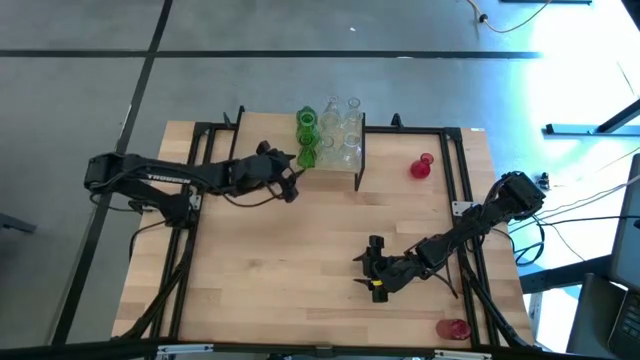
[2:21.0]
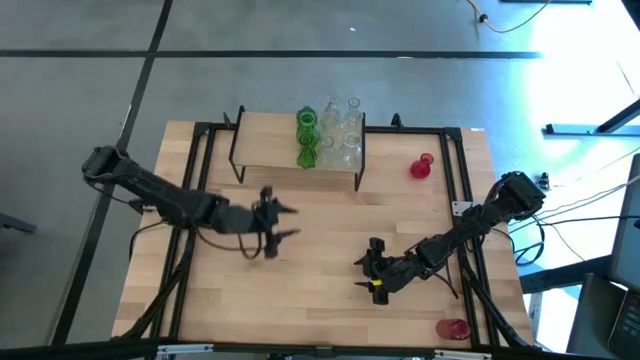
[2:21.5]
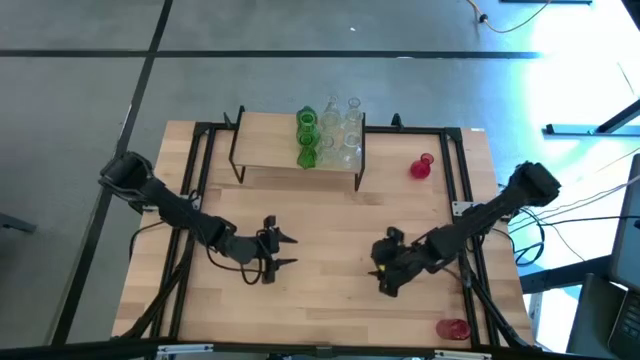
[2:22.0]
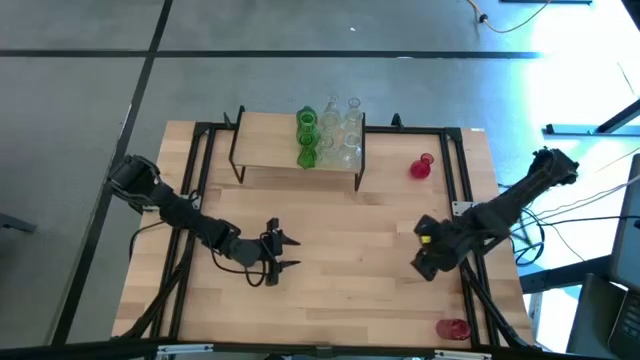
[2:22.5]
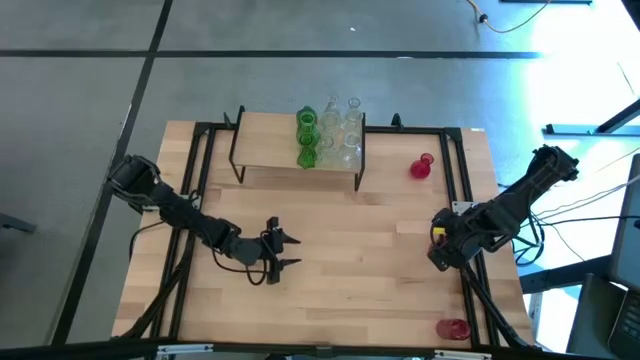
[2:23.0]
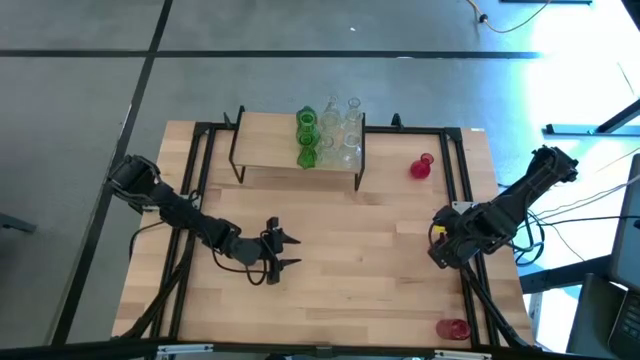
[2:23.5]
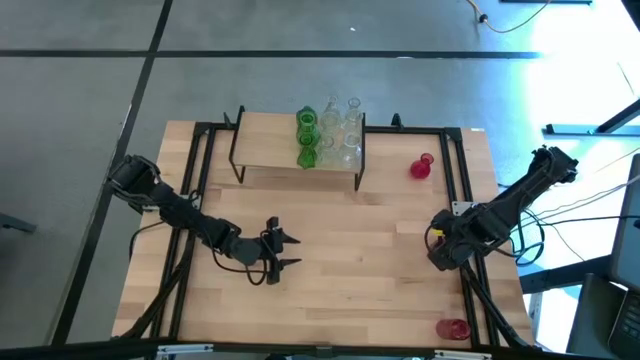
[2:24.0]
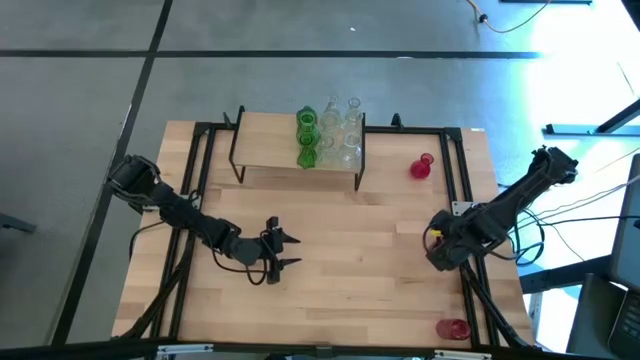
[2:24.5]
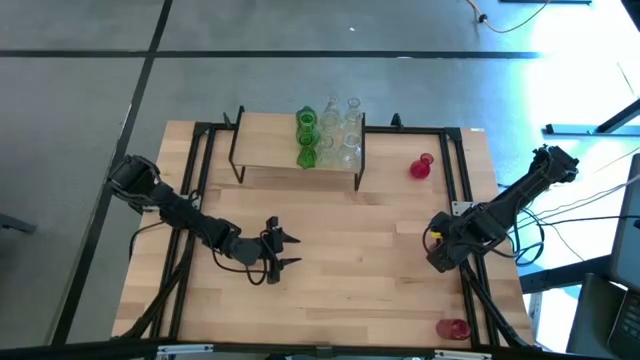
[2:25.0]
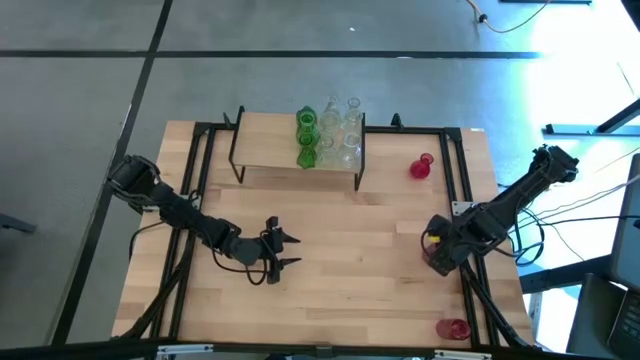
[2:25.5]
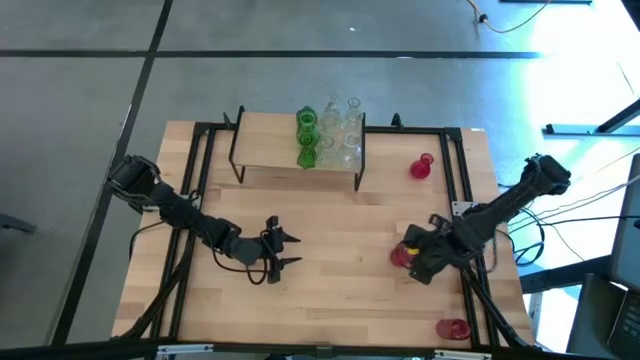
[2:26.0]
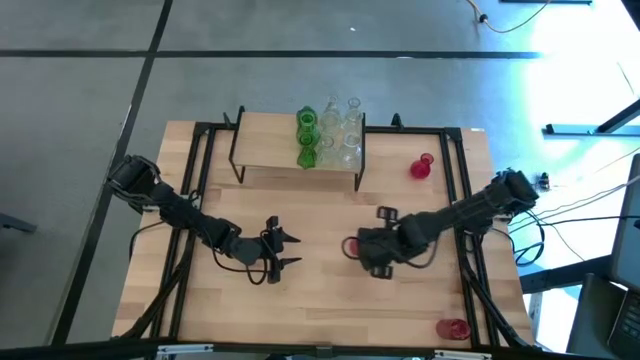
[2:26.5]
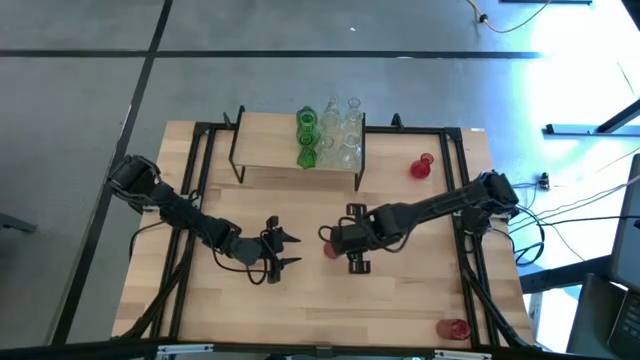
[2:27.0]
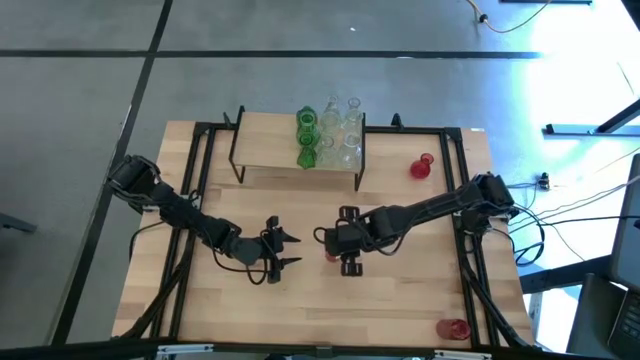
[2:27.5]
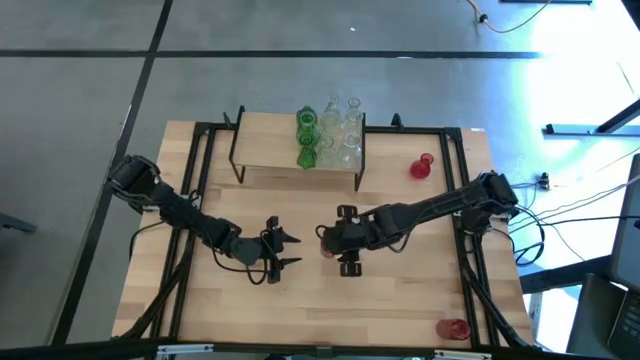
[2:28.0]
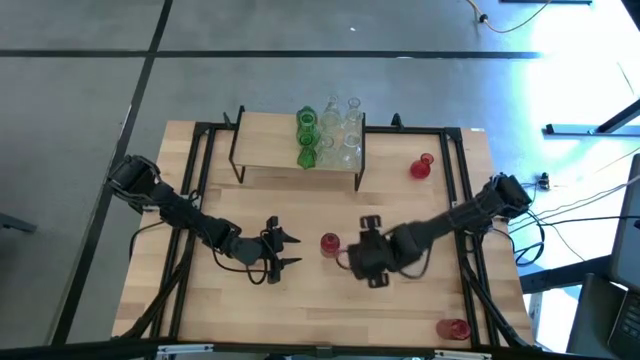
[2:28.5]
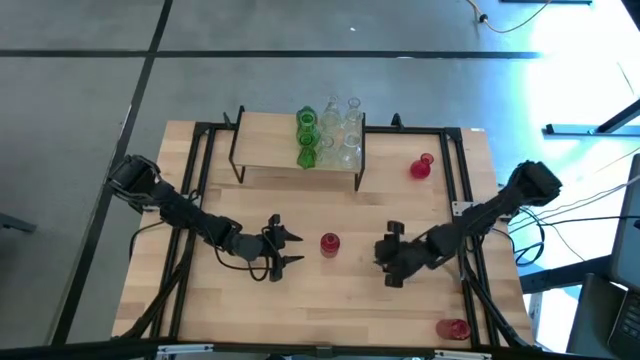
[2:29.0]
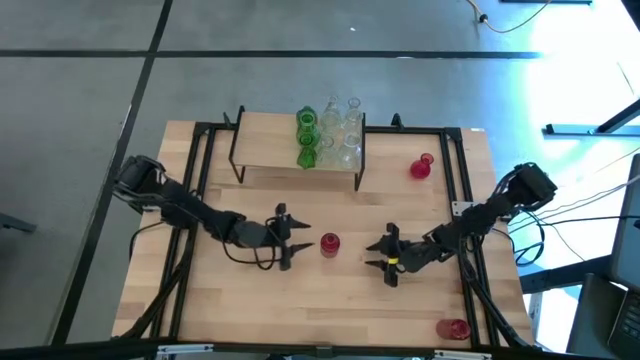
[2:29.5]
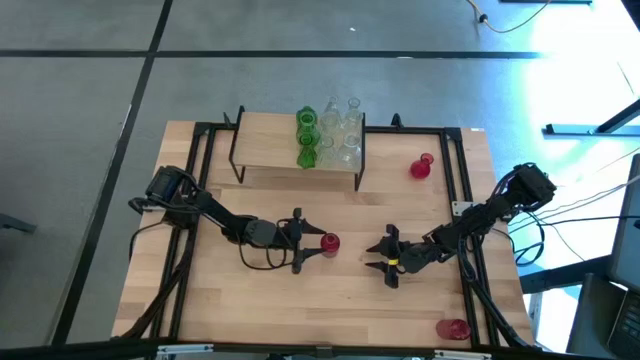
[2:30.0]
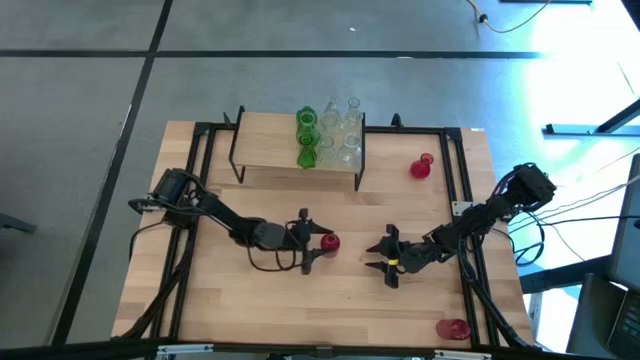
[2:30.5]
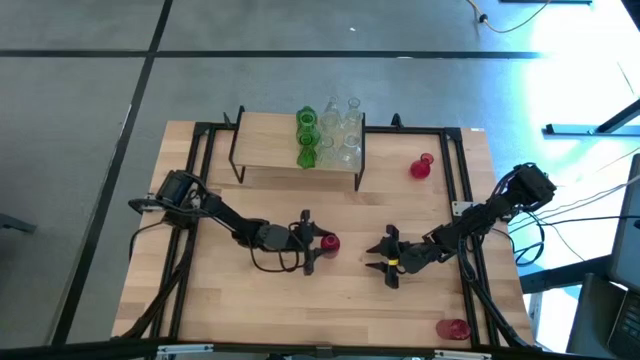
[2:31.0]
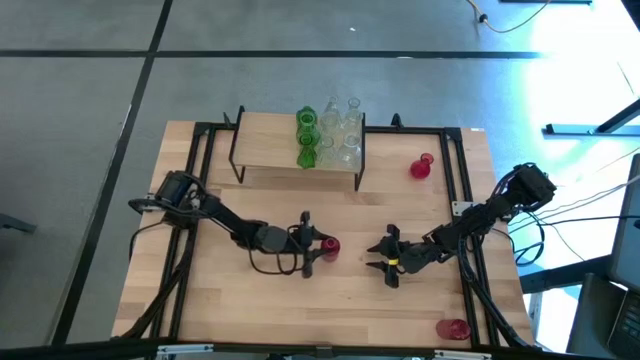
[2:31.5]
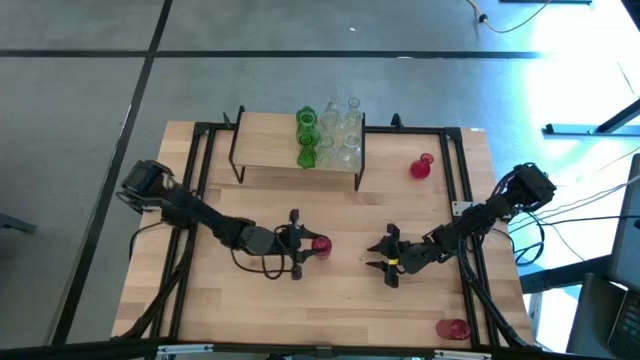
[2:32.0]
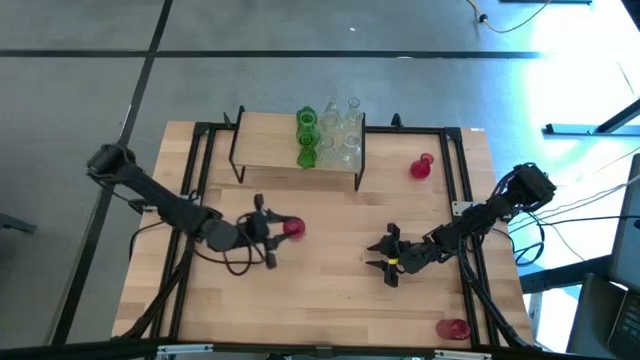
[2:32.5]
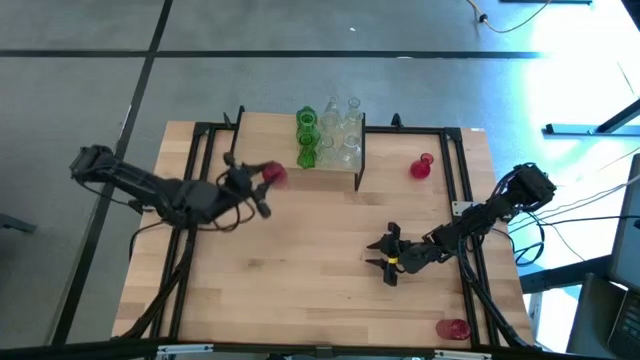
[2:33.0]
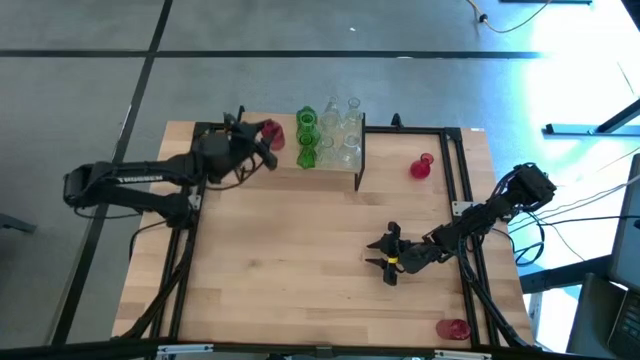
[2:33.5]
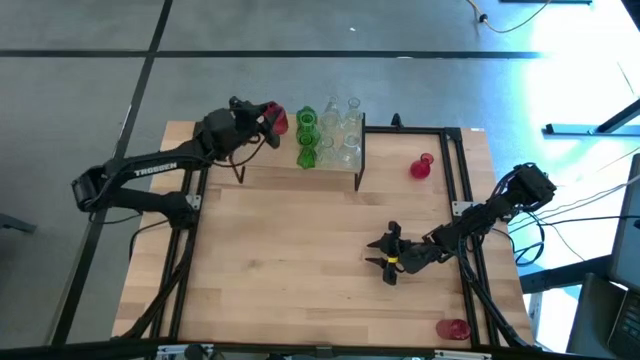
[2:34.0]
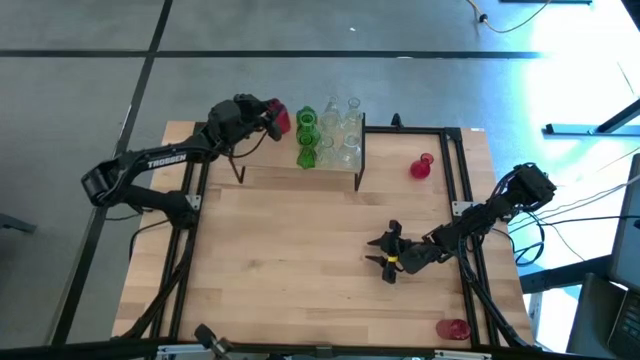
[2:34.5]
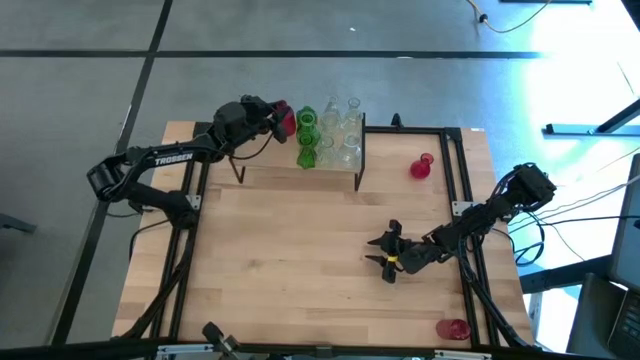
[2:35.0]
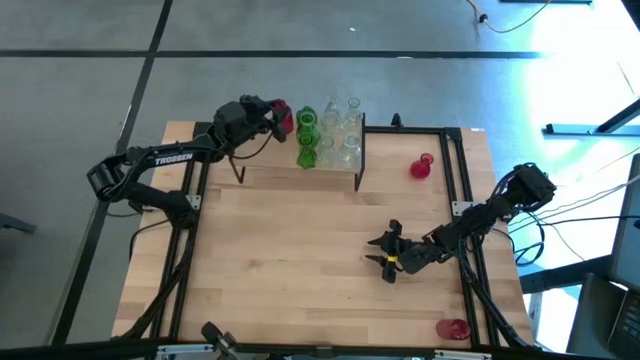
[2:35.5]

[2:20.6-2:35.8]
Task: sort vases onto shelf
Put the middle red vase on the shelf

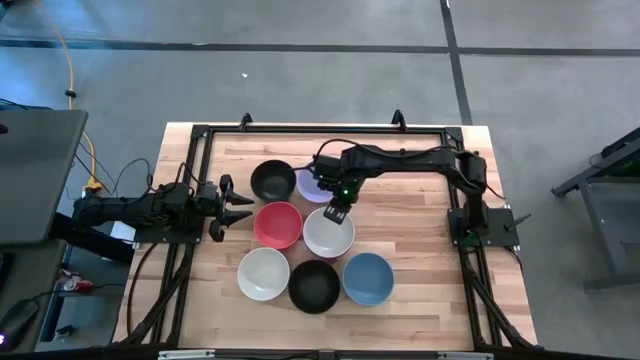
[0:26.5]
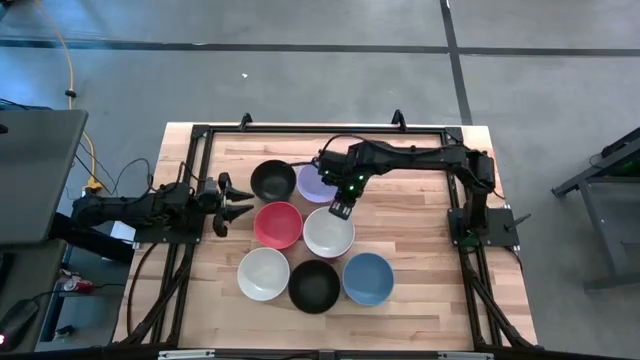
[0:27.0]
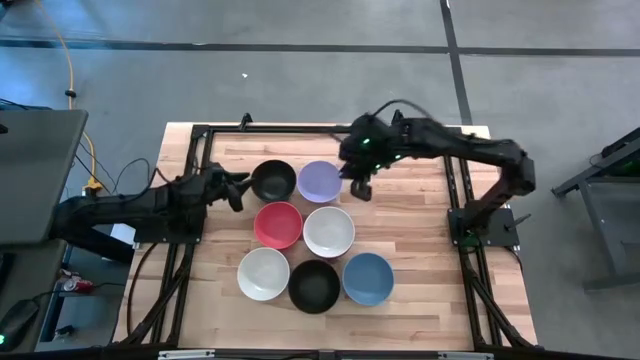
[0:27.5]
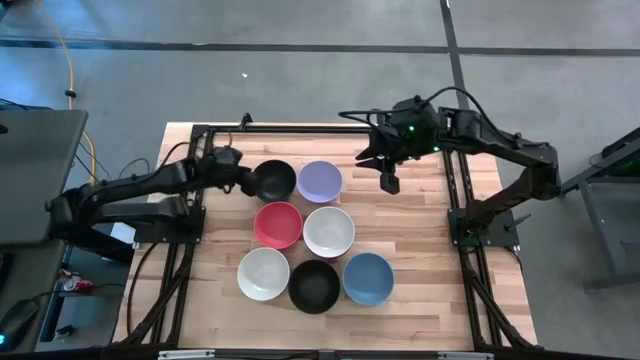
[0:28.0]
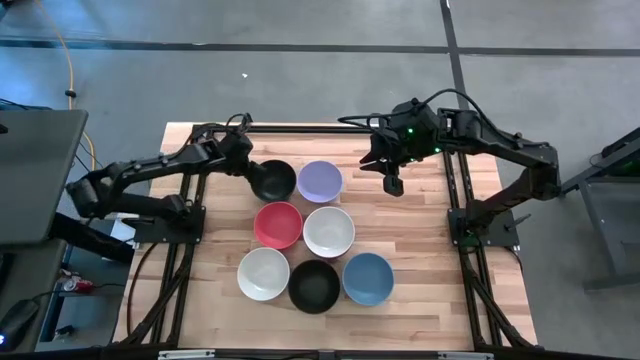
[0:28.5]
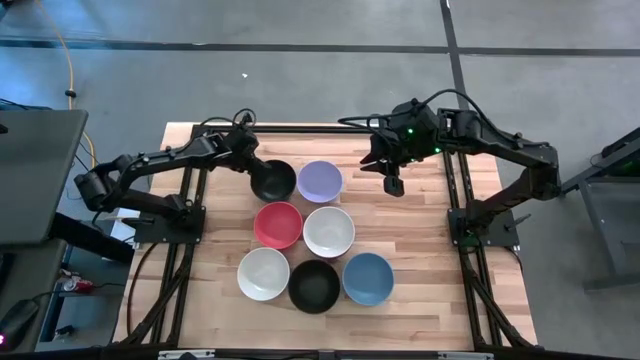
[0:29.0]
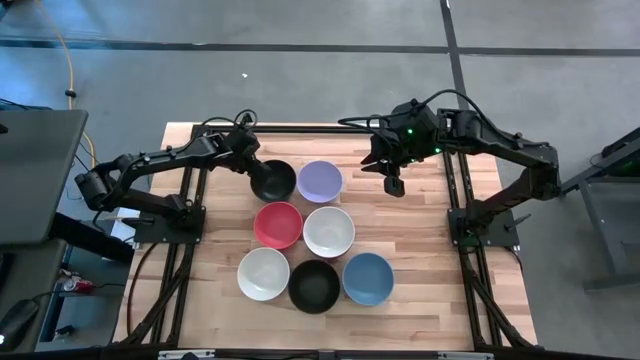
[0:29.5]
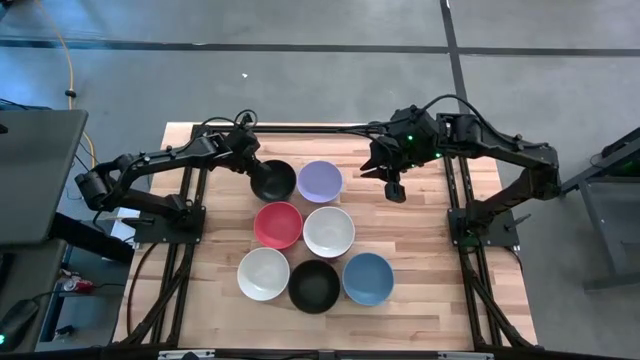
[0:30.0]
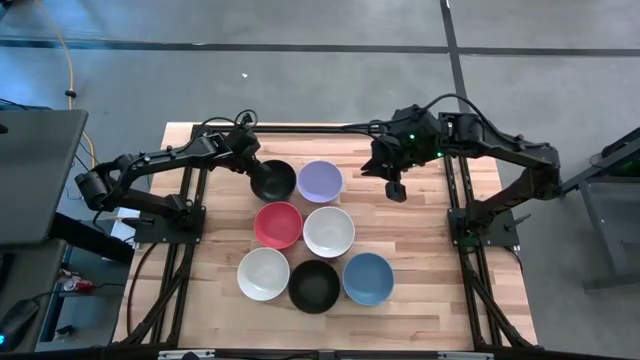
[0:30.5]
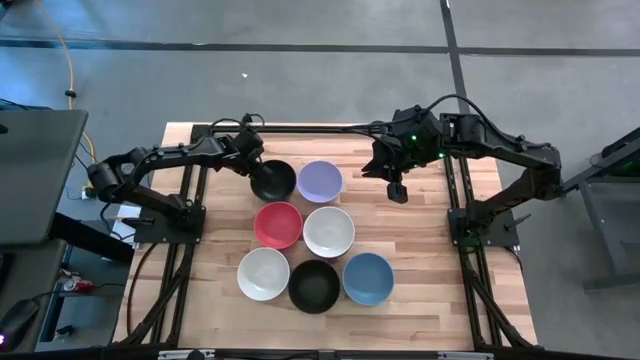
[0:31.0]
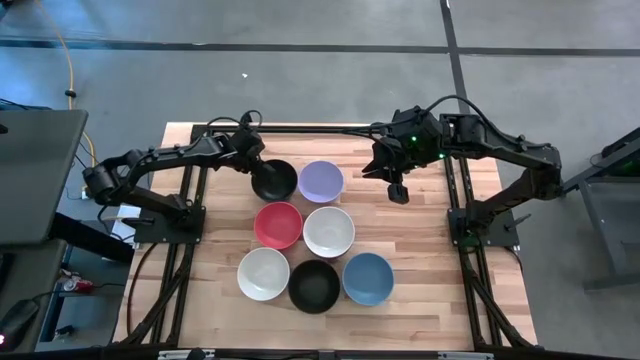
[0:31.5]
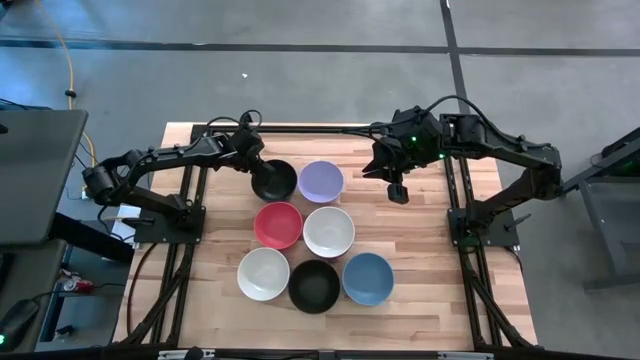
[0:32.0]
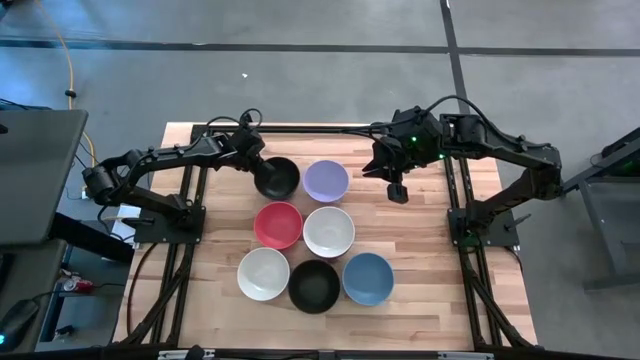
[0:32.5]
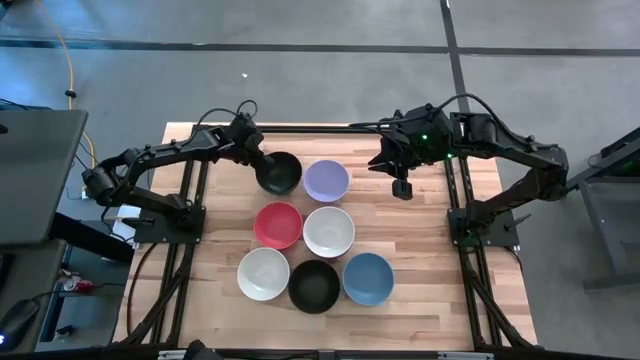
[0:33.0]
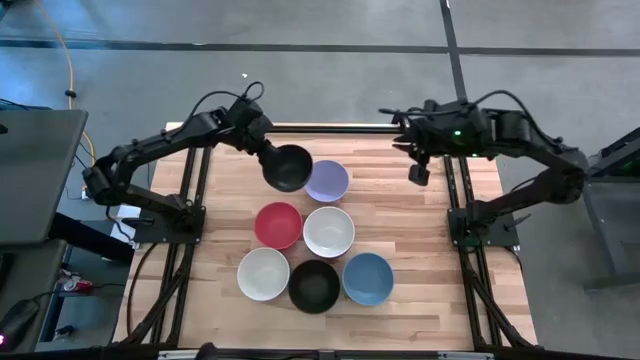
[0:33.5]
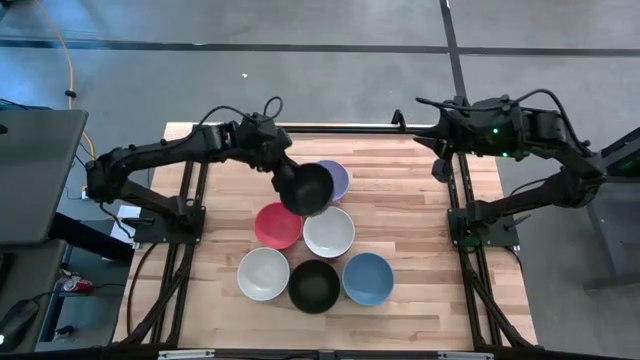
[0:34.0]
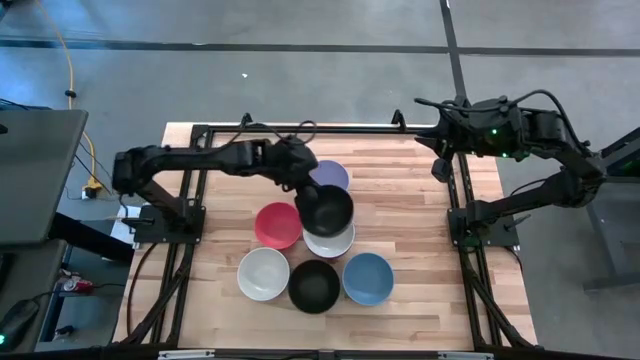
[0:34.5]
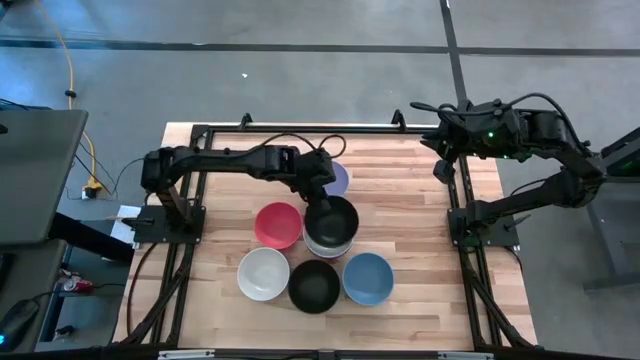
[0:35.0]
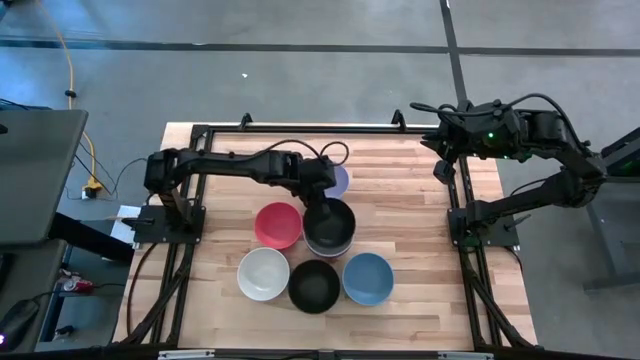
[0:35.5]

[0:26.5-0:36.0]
Task: Nest bowls inside each other
Stack the top black bowl on top of the right white bowl
